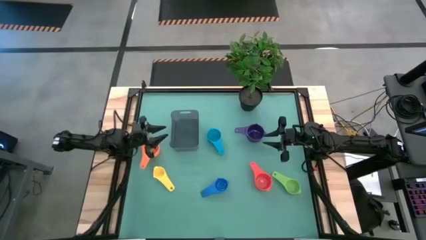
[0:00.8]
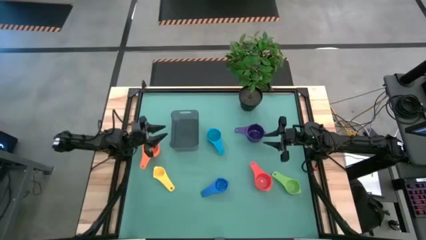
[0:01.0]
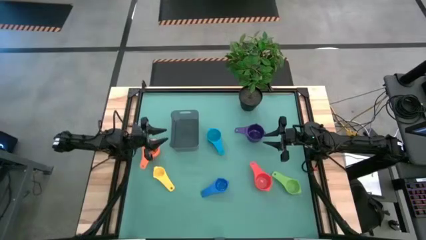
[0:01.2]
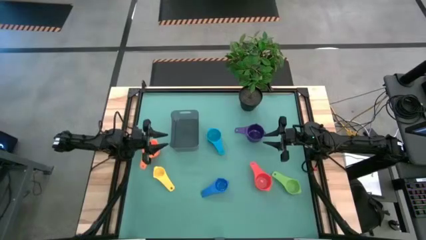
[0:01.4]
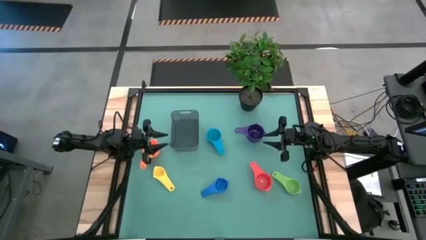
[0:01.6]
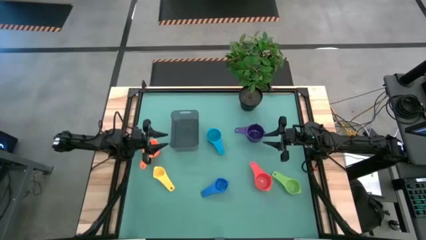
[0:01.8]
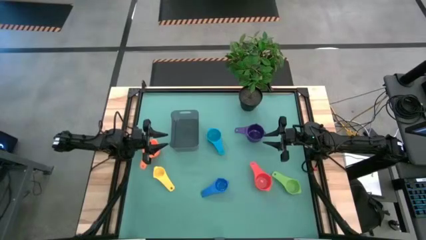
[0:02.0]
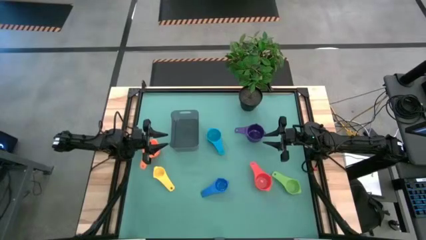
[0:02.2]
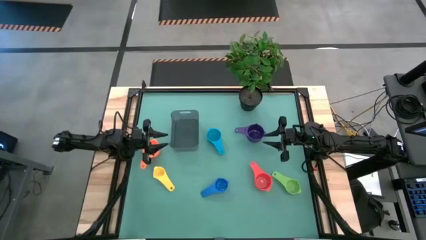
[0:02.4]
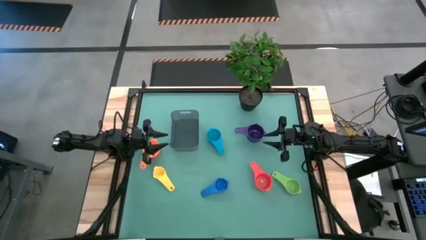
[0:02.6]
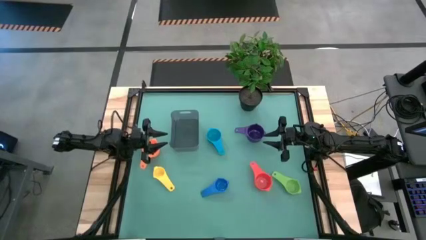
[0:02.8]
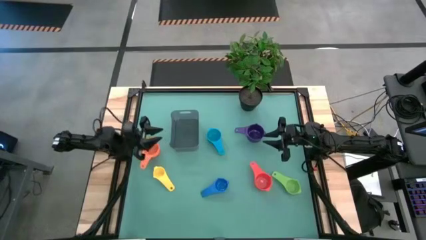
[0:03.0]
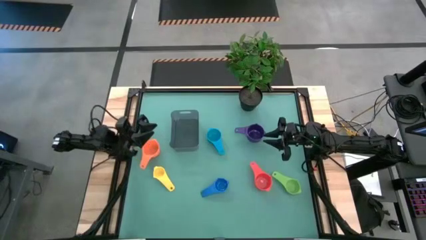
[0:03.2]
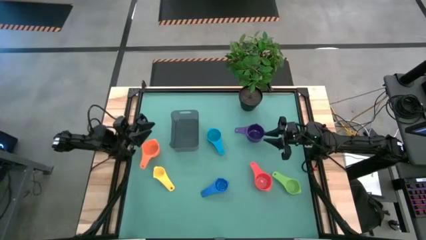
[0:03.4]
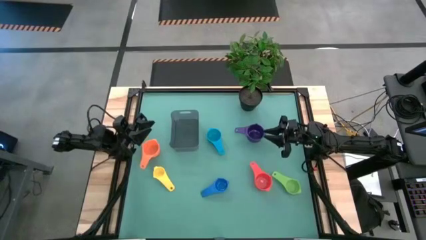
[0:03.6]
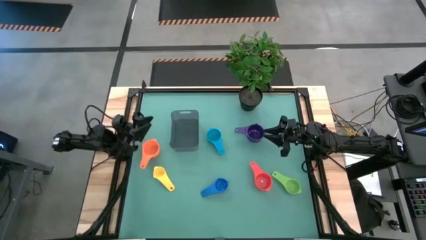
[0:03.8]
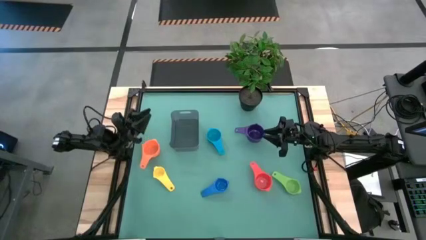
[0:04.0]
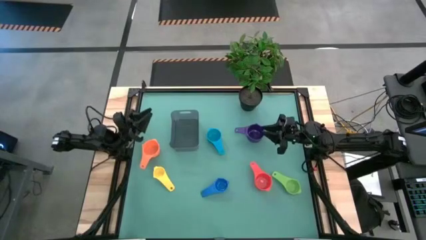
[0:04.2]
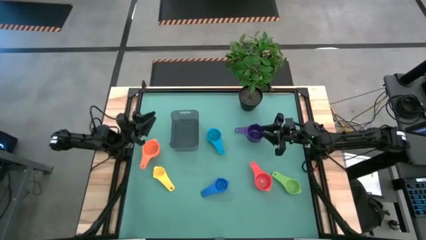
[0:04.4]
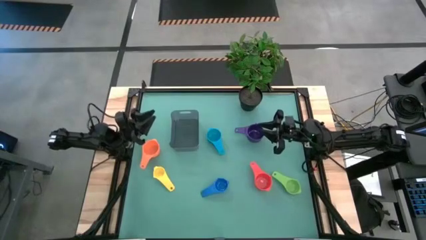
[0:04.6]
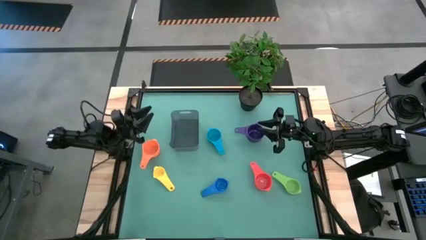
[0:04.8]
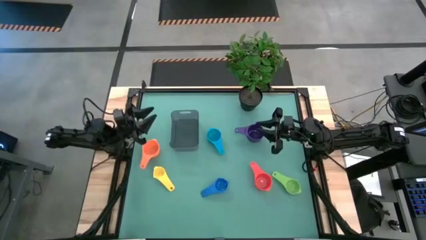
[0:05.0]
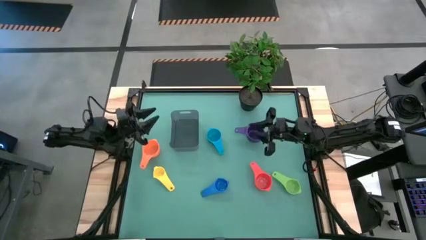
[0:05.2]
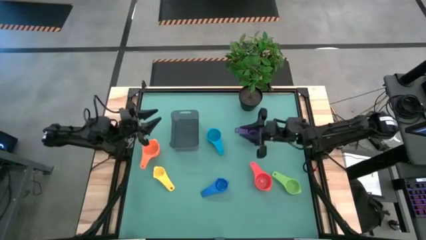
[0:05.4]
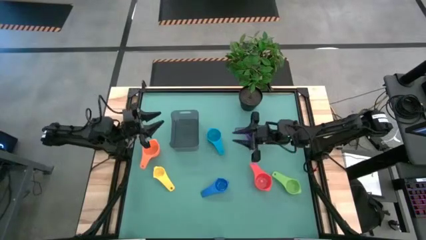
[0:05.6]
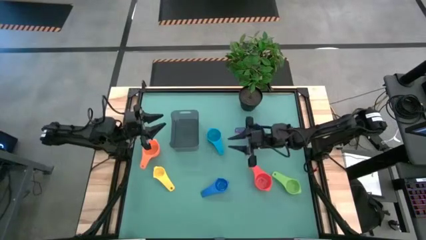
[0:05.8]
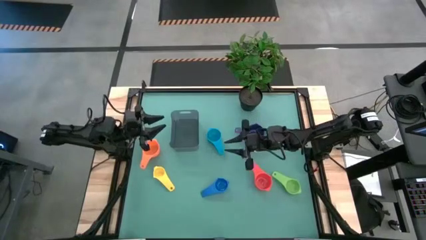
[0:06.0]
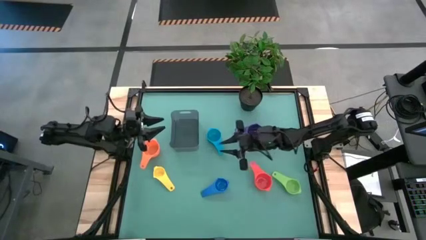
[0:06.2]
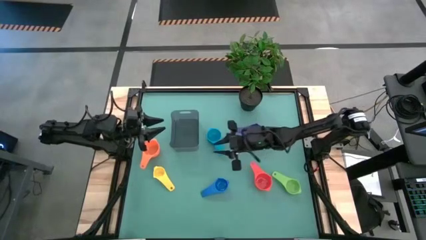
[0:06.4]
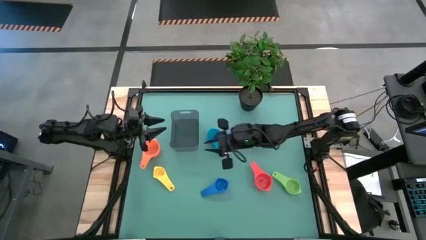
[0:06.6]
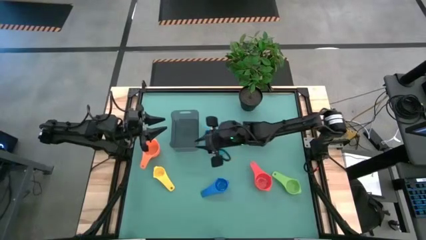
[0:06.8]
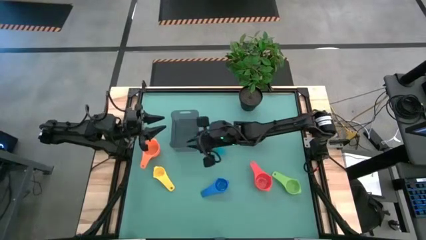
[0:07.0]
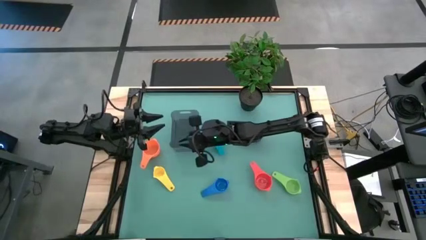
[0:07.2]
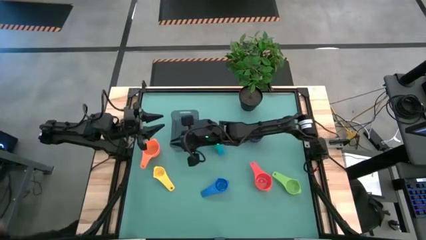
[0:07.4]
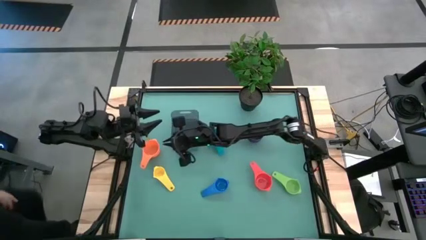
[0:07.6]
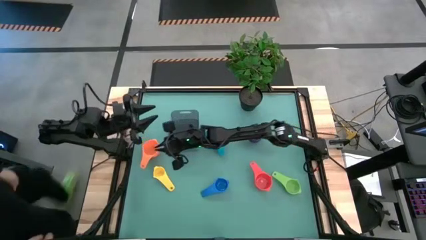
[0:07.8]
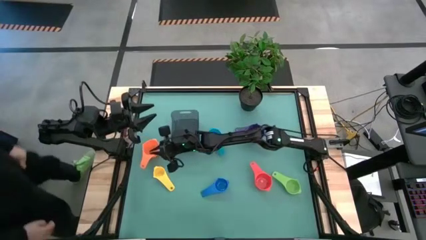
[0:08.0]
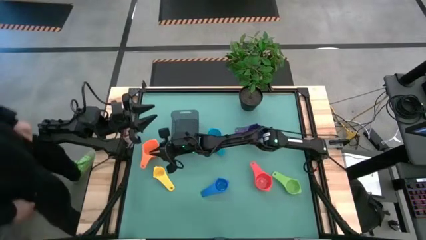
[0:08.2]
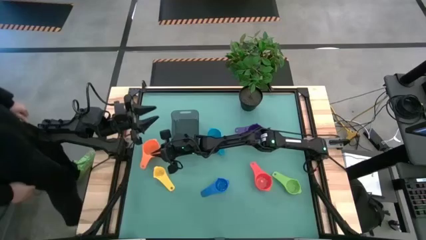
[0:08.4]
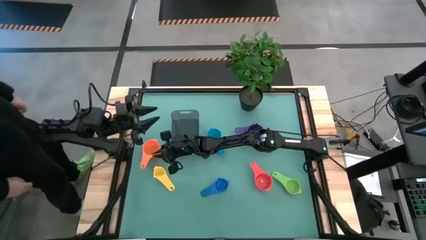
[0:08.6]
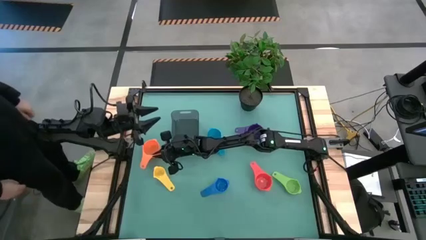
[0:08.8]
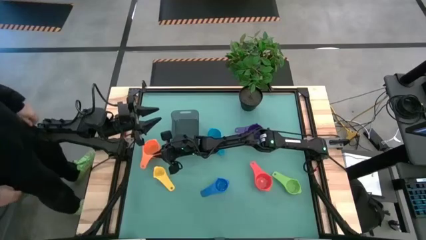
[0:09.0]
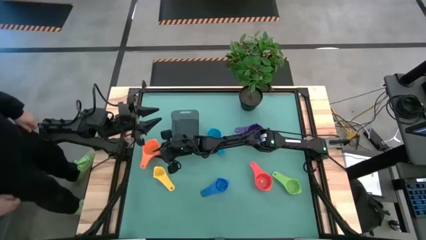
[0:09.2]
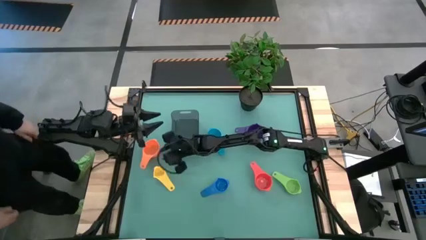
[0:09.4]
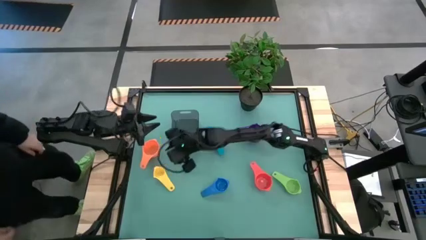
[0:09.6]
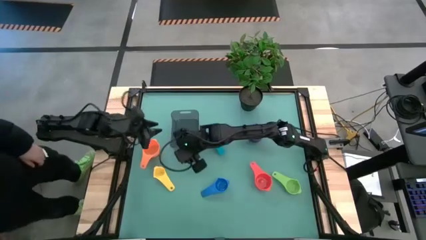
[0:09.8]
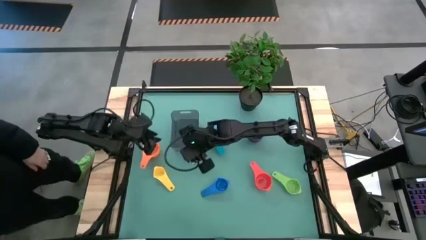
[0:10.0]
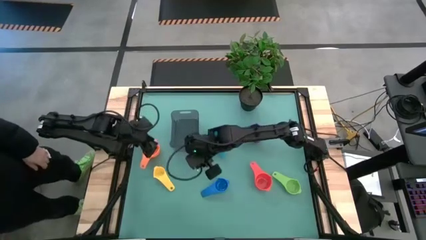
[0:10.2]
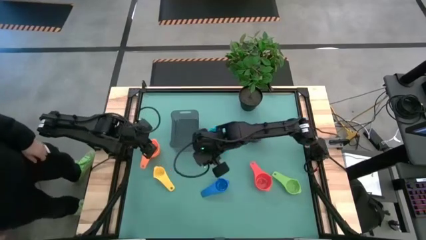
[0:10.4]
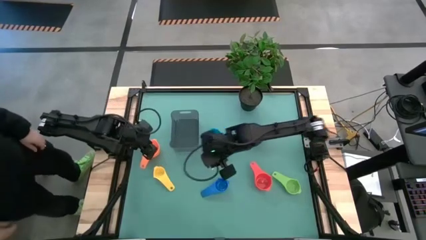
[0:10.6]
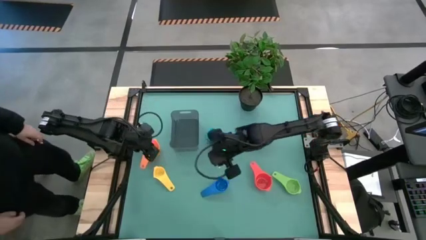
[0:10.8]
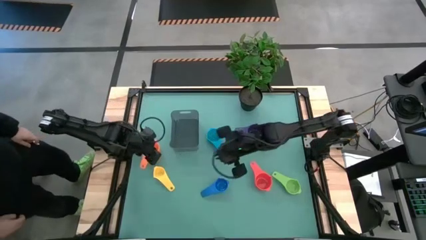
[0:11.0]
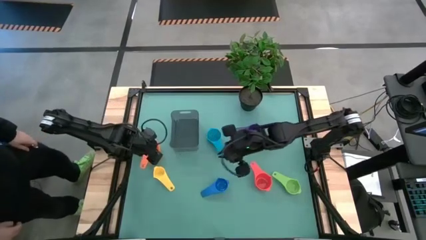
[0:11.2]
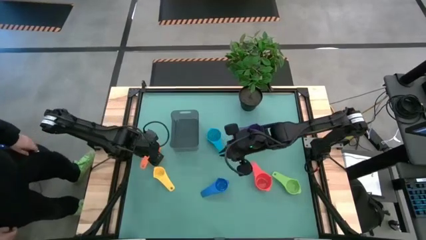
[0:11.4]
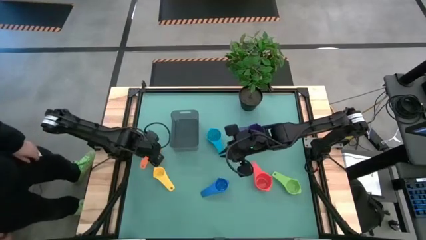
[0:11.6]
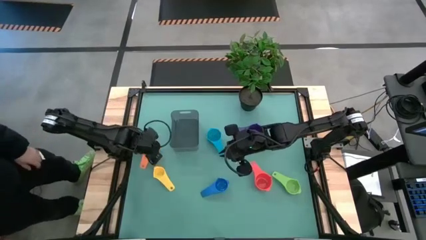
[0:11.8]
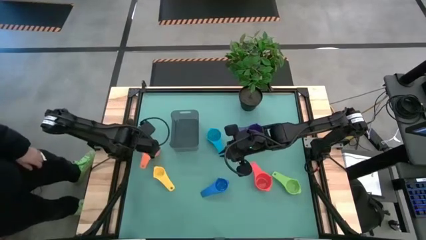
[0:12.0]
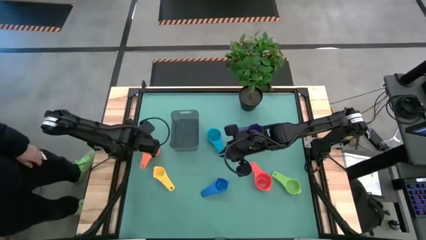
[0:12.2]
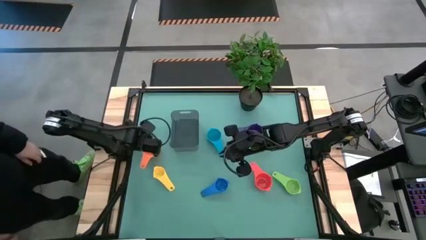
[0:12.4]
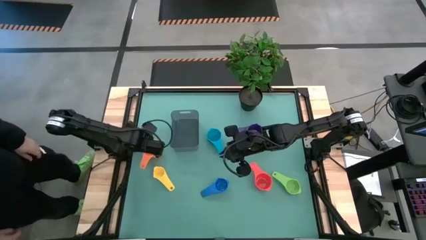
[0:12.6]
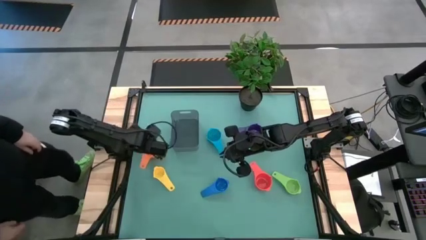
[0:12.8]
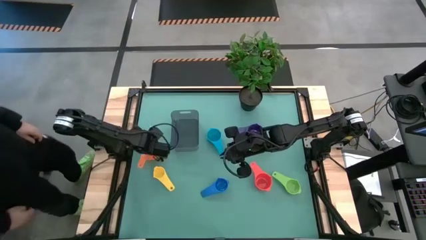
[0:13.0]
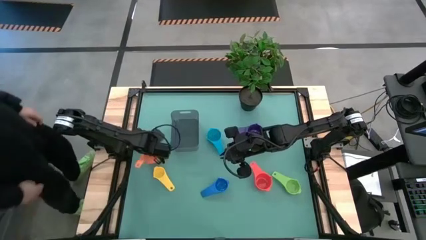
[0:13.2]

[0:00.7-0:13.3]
Task: Nest measuring cups in basket
Stack the orange measuring cup on top of the violet measuring cup
